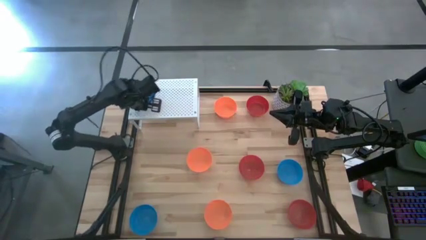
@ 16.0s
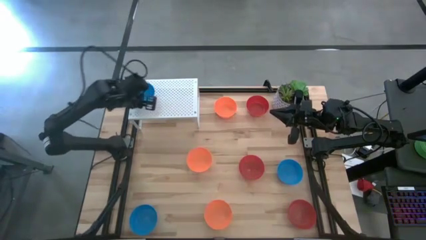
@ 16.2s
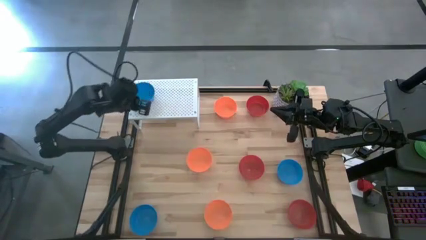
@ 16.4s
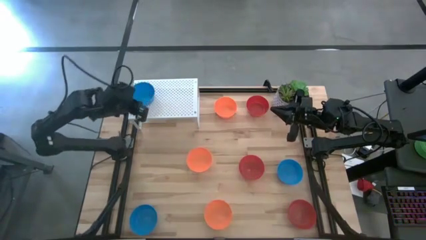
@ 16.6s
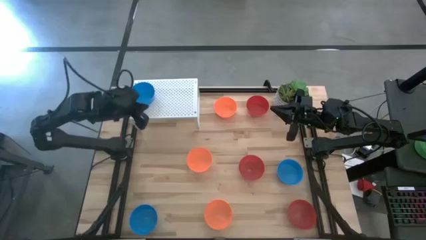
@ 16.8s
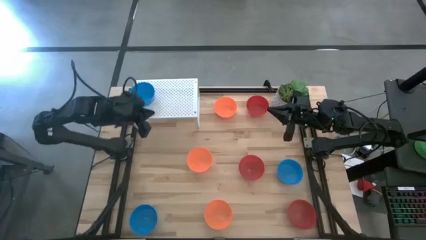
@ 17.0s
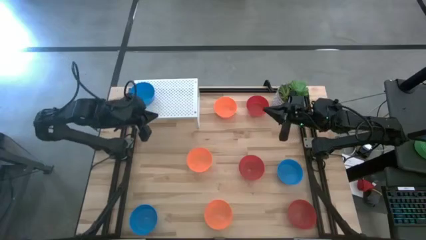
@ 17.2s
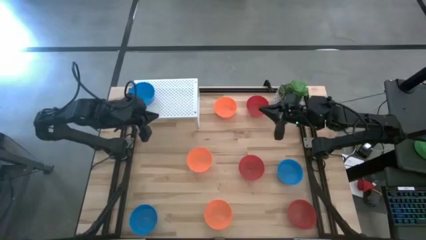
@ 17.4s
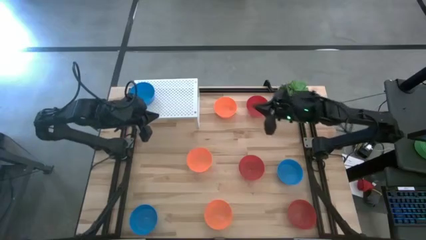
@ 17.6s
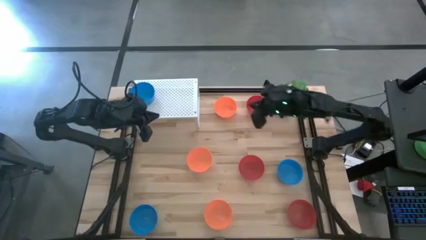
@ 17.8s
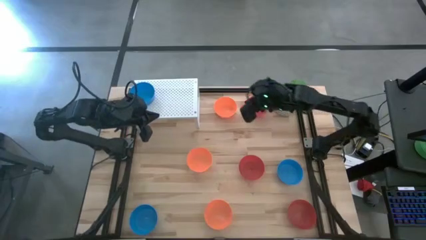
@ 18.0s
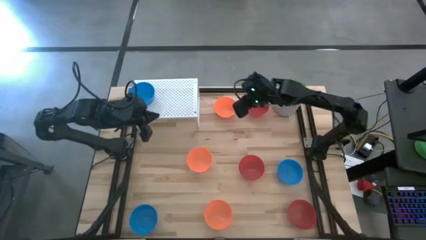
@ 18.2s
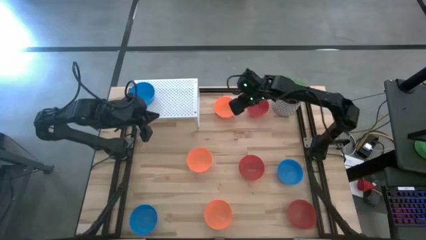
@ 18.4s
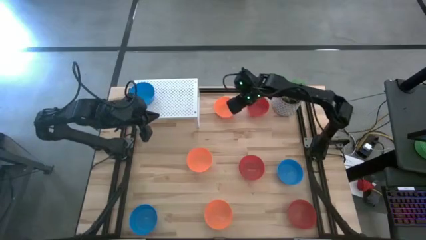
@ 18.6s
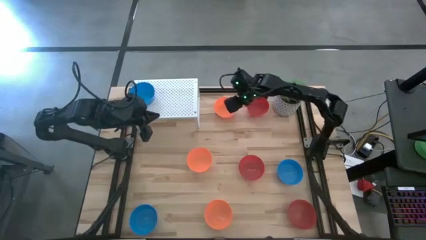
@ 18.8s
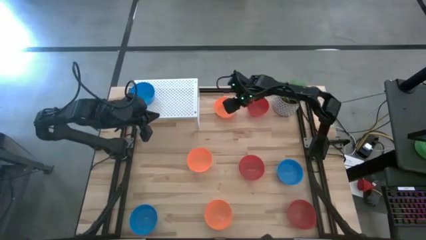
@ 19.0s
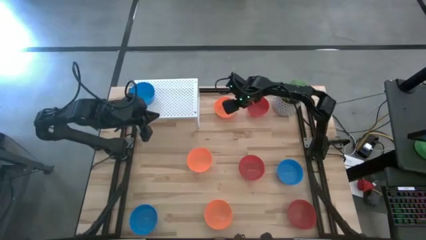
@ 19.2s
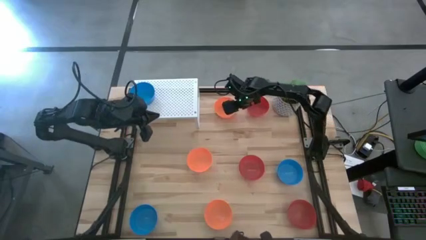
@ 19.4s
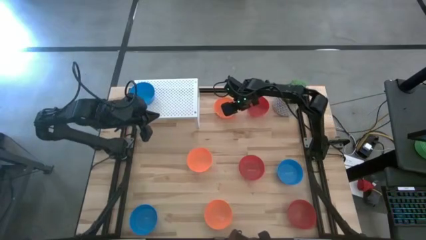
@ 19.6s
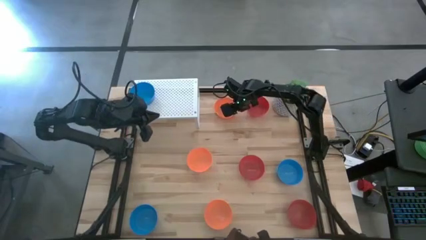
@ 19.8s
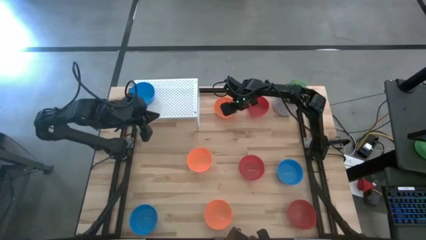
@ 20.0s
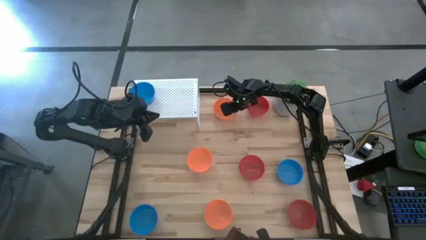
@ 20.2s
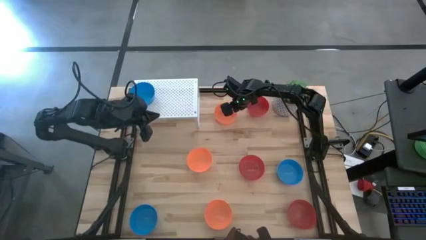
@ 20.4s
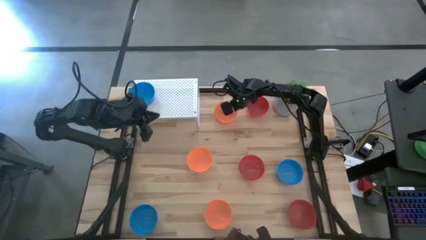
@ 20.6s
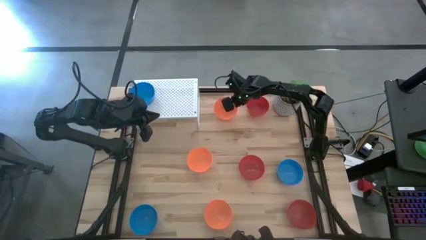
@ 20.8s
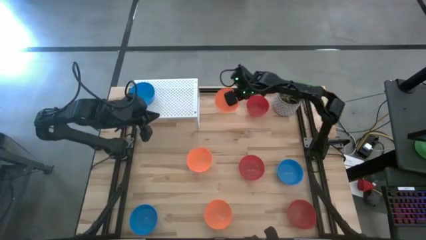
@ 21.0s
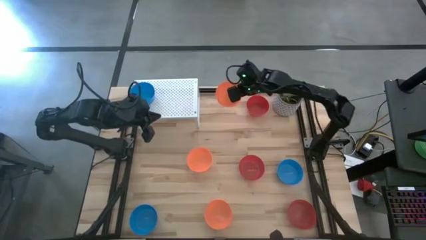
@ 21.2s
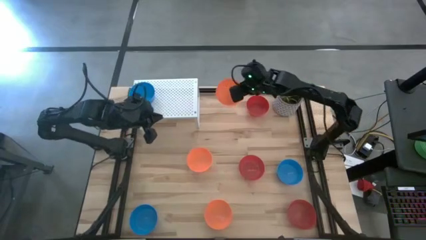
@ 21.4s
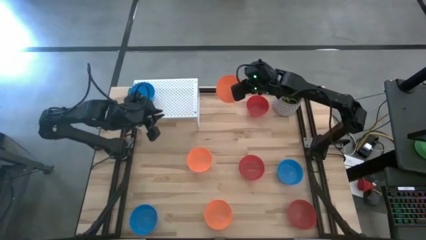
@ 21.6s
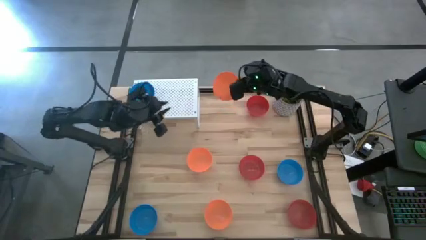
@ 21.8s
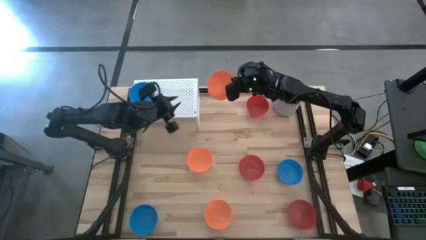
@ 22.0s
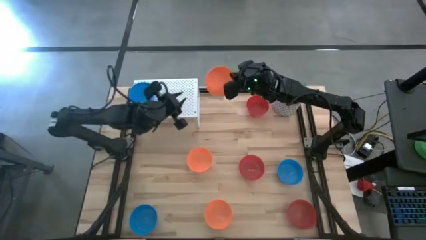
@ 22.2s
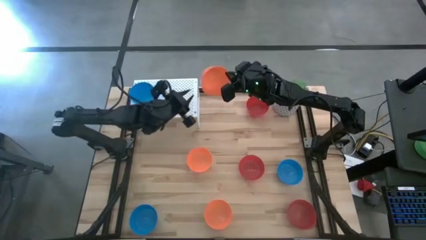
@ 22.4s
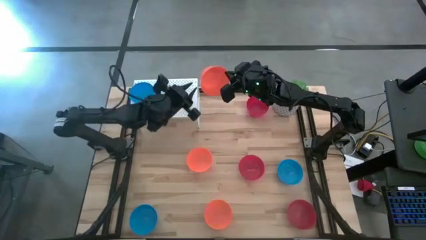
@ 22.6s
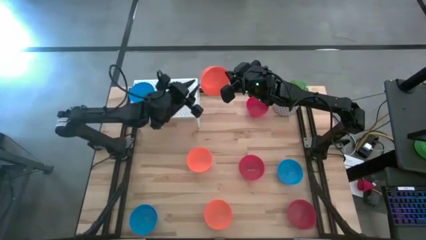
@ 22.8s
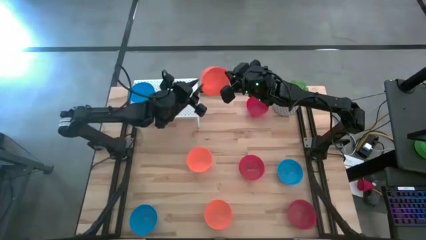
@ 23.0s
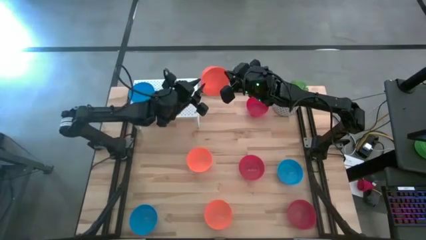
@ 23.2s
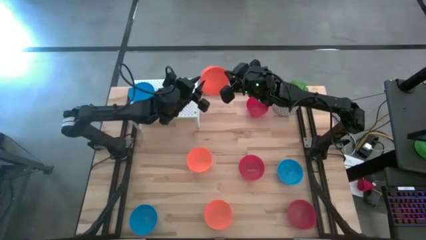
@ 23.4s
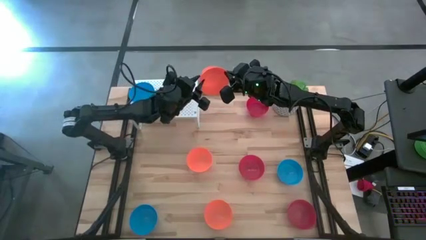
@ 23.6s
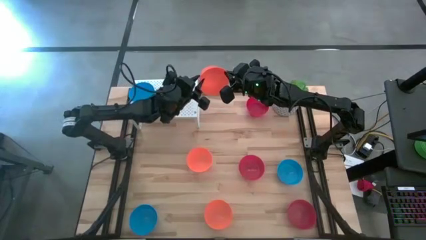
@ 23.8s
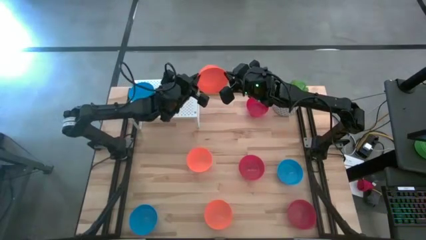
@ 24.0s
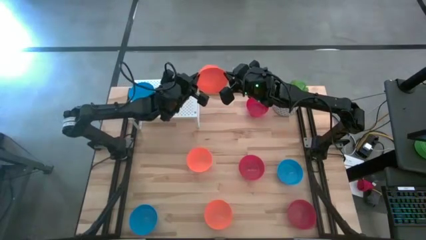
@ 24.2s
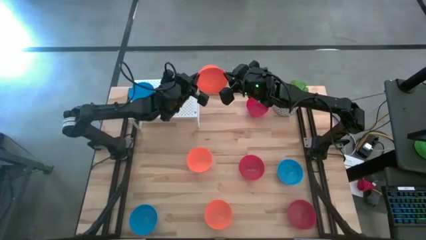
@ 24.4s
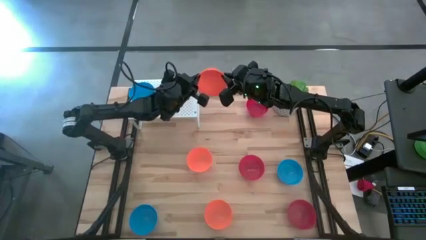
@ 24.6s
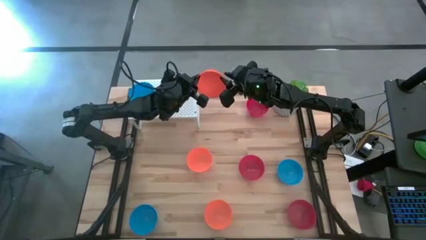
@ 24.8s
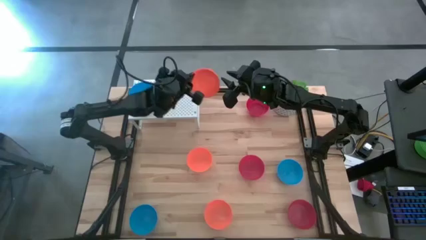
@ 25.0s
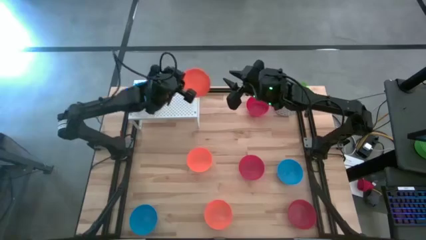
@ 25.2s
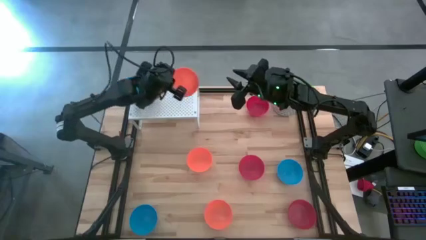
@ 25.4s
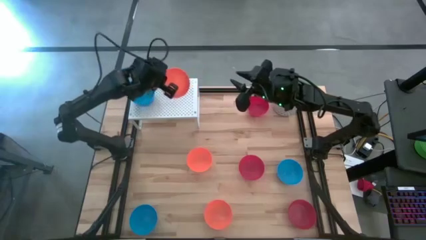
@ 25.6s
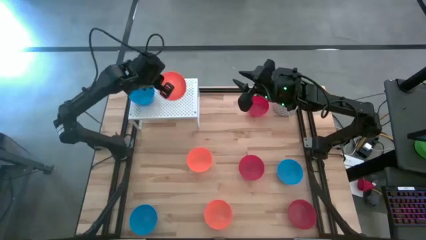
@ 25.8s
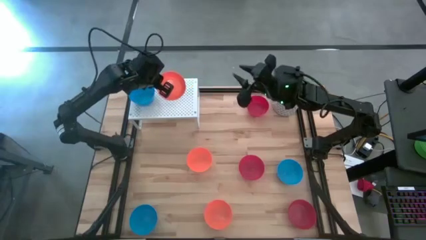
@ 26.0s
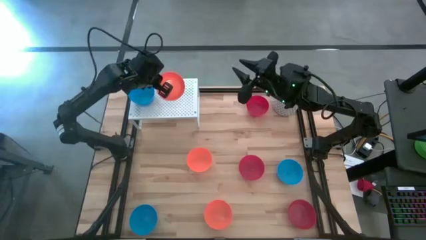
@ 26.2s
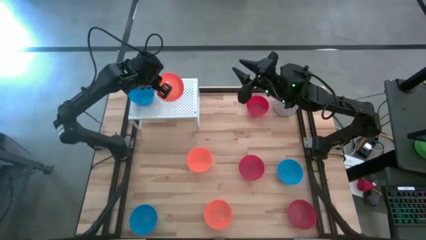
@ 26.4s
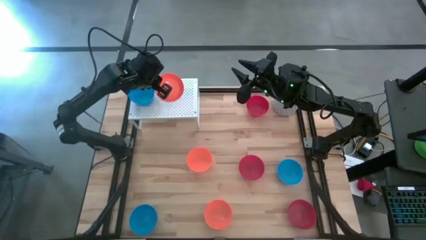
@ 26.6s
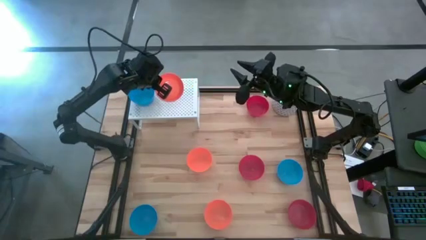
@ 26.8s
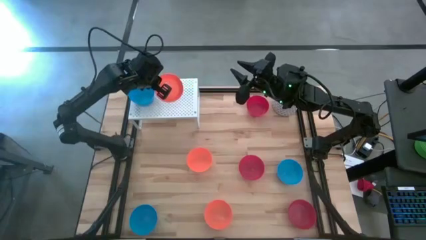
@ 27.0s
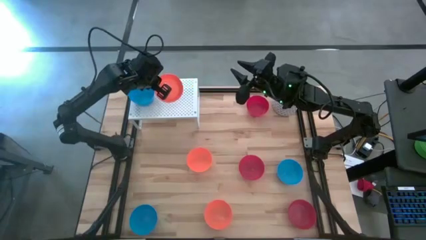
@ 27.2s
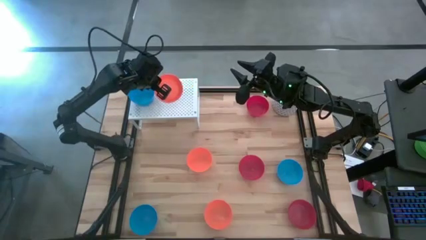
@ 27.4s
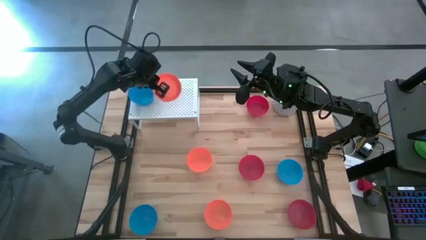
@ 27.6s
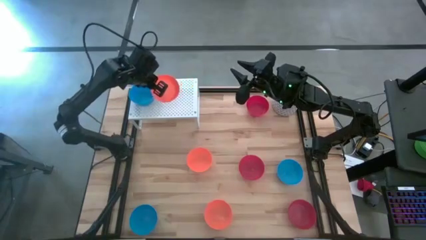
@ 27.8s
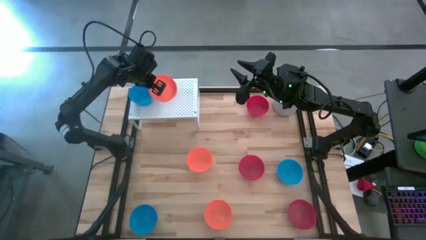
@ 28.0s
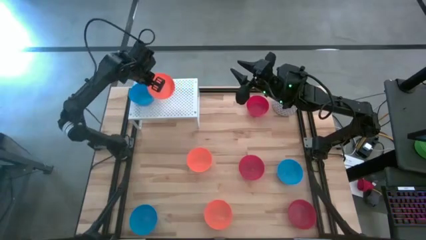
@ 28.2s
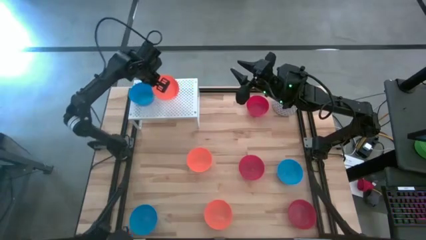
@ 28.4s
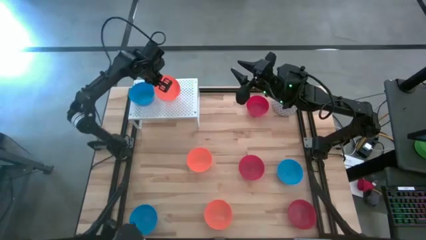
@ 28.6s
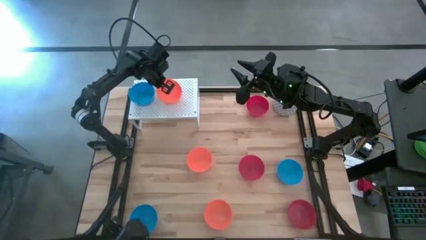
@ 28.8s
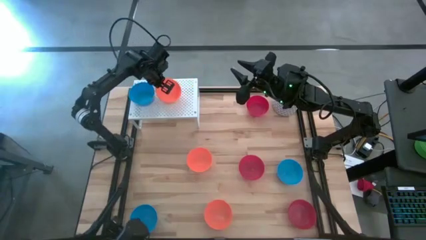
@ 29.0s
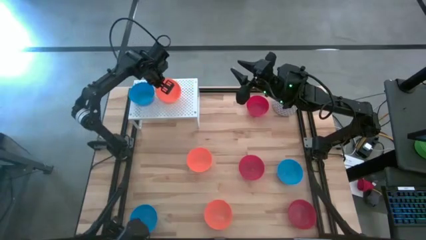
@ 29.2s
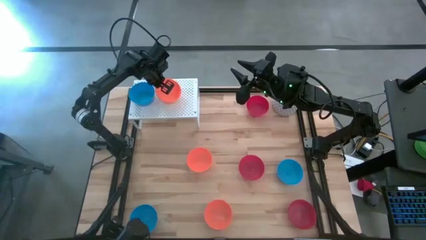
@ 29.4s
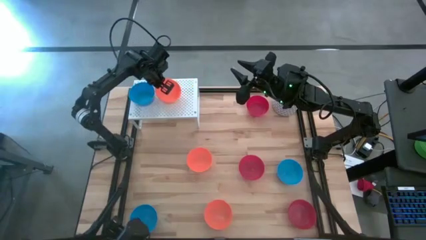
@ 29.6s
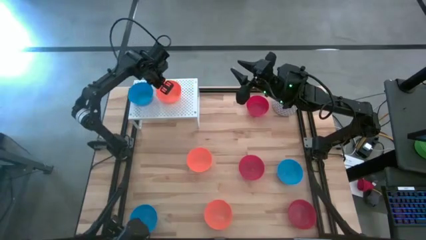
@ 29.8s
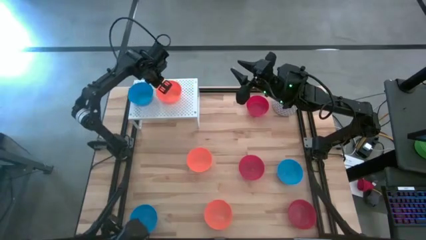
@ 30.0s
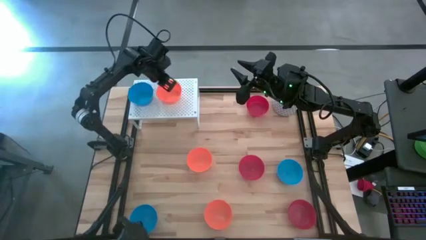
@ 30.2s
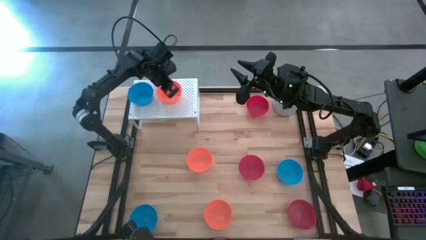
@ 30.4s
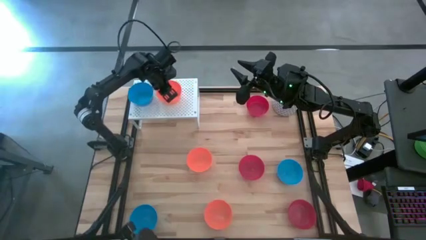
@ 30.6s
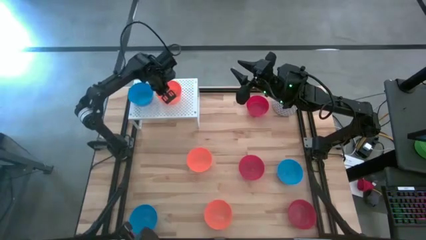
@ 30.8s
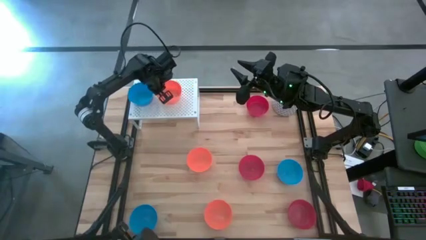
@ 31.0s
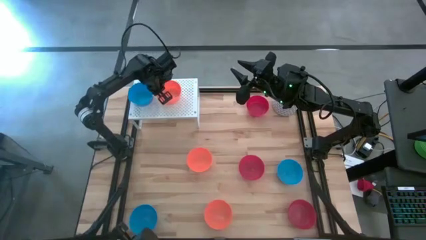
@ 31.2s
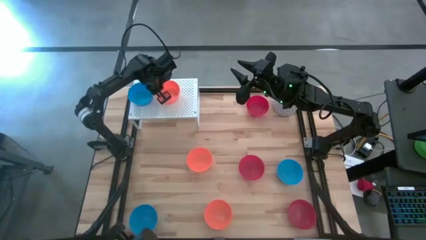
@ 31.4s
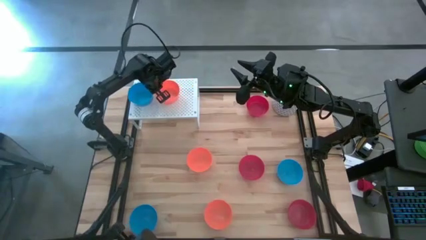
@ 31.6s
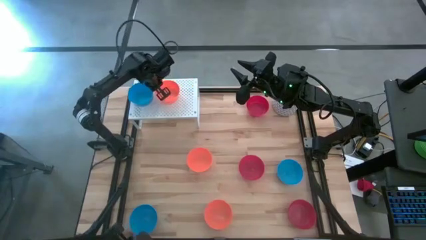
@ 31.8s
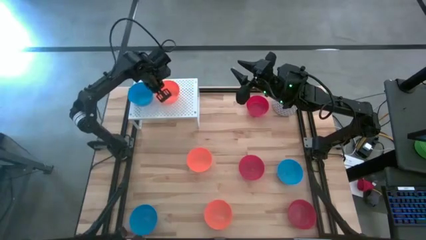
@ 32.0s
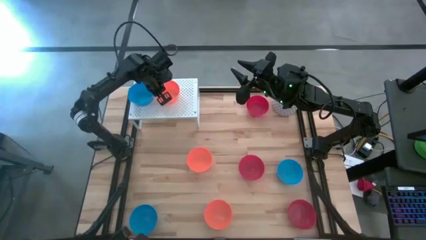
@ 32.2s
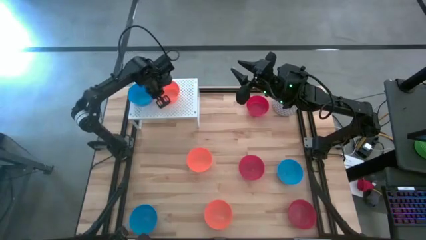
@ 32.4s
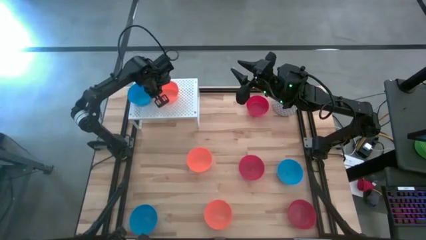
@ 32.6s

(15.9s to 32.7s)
Task: Pick & Place Mini bowls
Put the top orange bowl on the center part of the shelf
